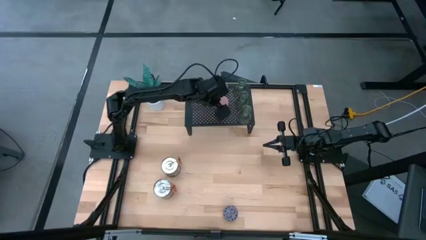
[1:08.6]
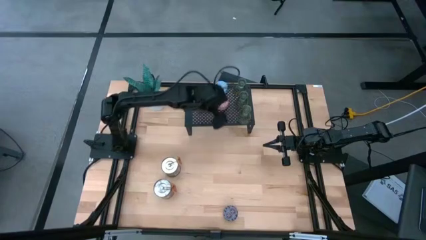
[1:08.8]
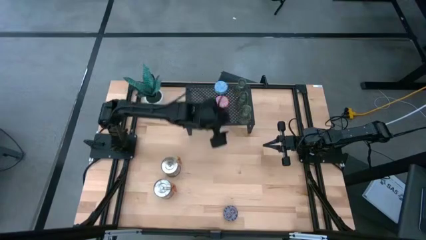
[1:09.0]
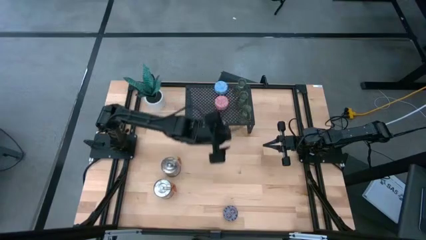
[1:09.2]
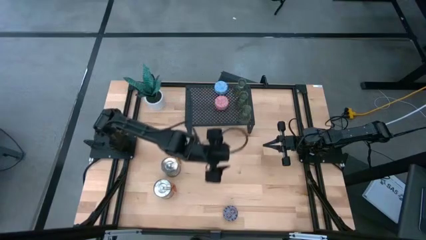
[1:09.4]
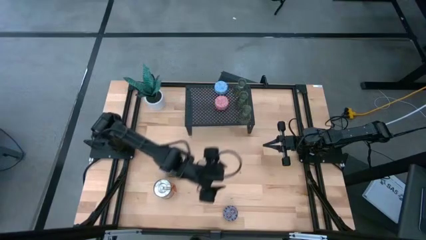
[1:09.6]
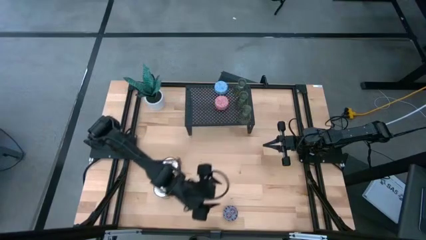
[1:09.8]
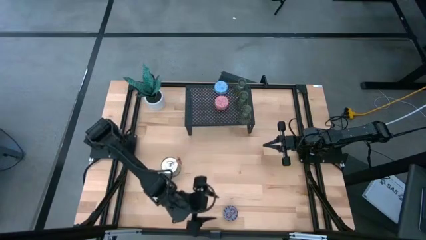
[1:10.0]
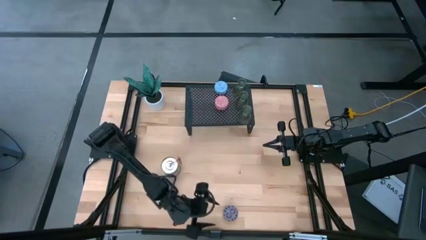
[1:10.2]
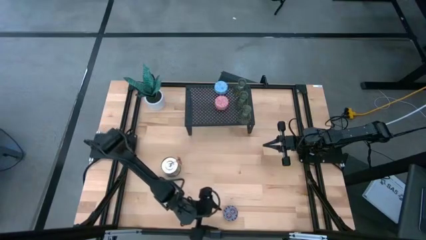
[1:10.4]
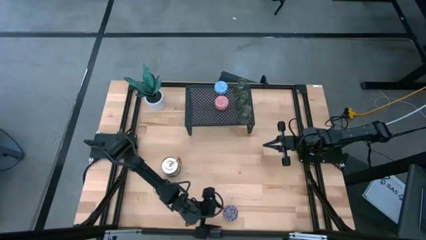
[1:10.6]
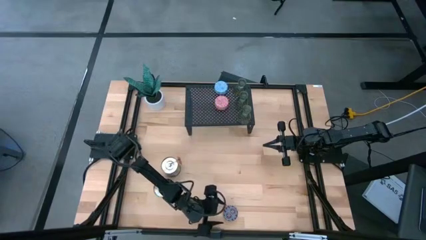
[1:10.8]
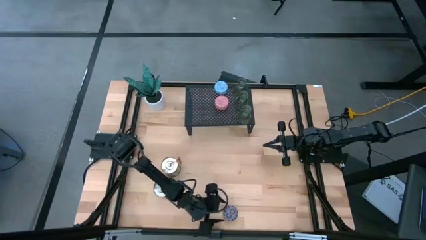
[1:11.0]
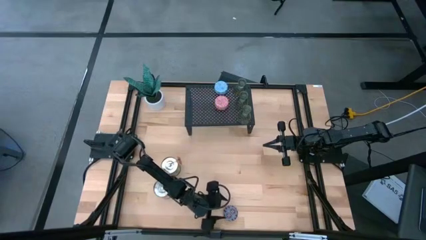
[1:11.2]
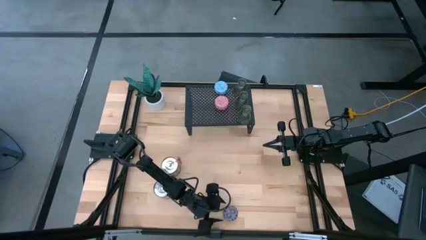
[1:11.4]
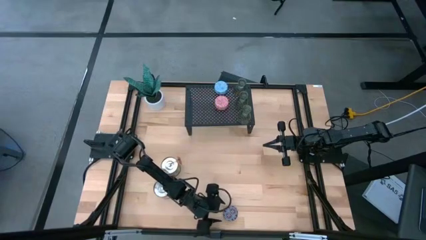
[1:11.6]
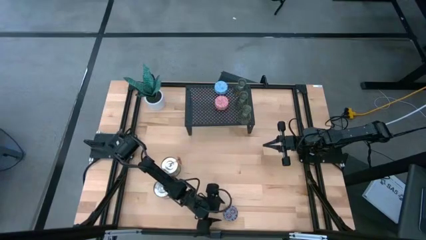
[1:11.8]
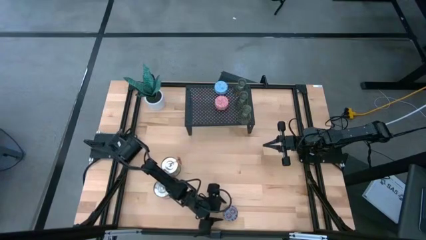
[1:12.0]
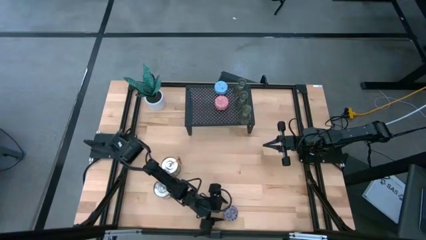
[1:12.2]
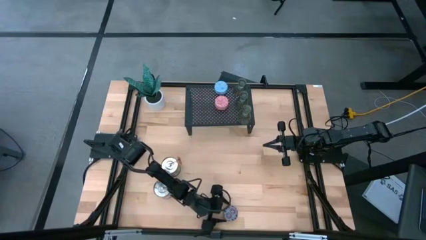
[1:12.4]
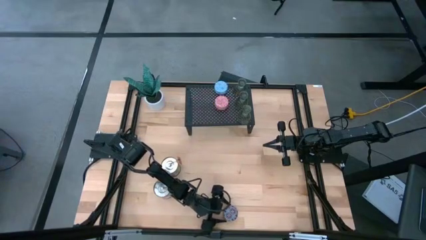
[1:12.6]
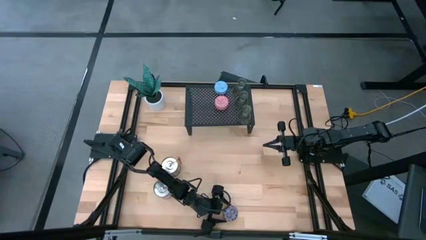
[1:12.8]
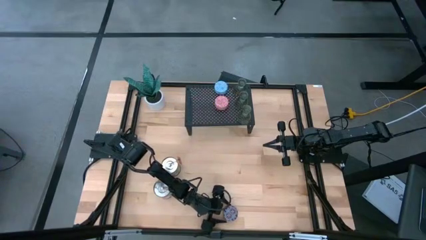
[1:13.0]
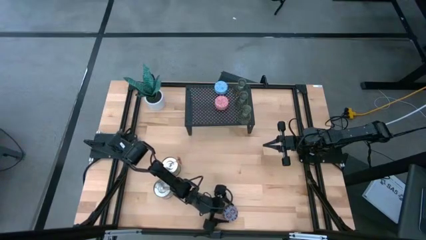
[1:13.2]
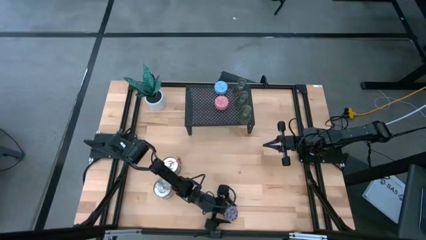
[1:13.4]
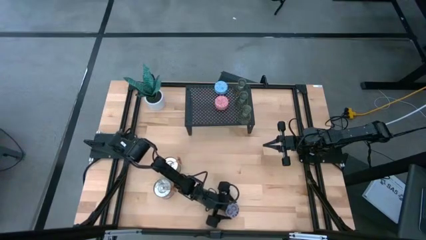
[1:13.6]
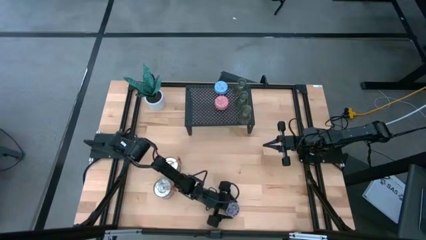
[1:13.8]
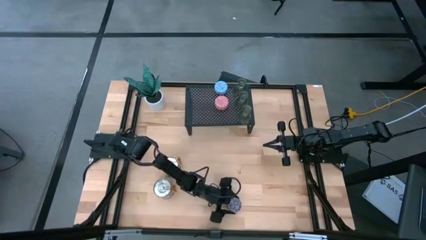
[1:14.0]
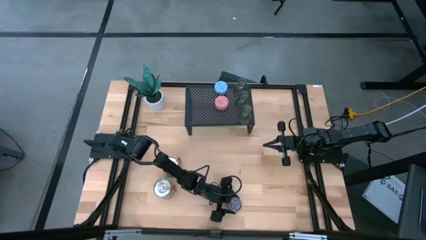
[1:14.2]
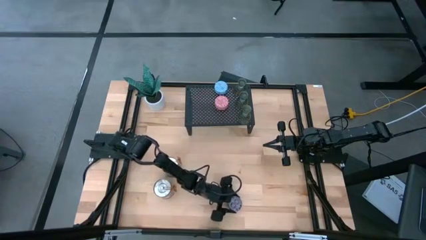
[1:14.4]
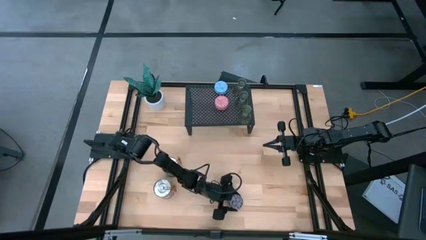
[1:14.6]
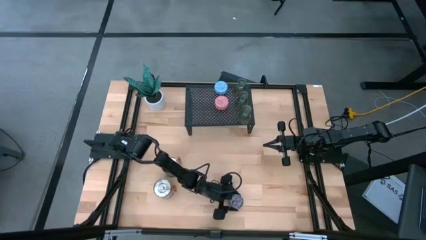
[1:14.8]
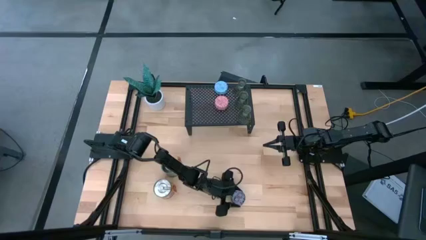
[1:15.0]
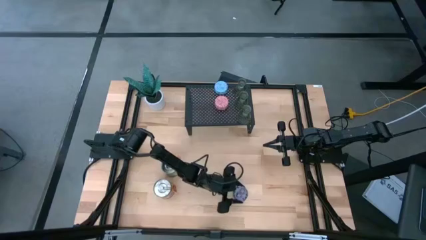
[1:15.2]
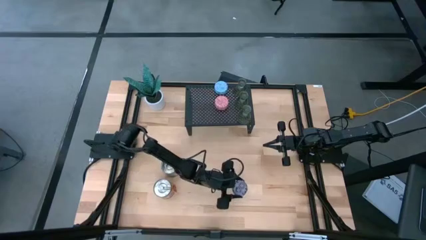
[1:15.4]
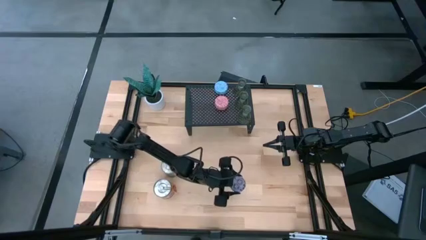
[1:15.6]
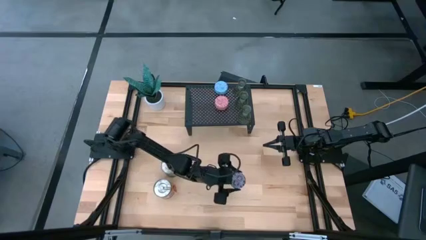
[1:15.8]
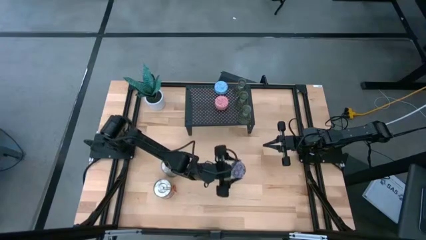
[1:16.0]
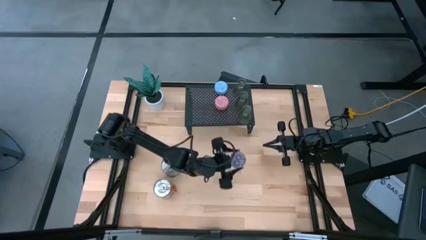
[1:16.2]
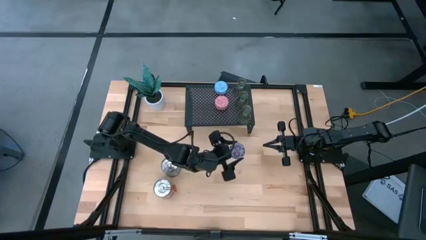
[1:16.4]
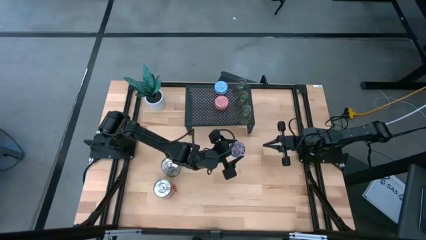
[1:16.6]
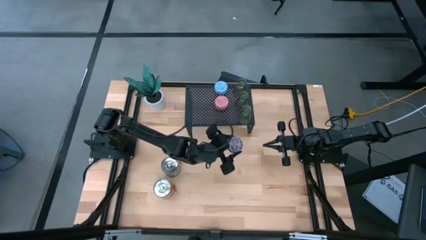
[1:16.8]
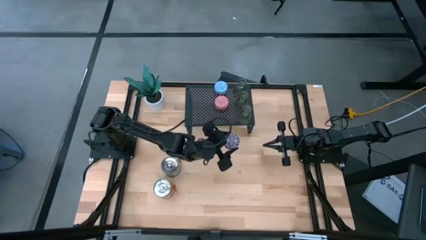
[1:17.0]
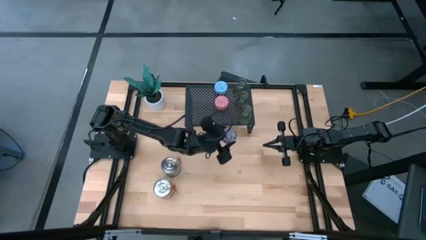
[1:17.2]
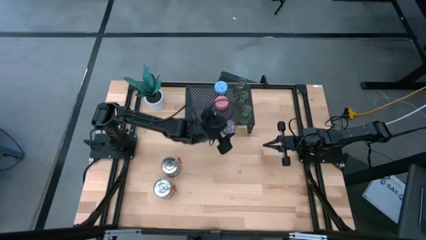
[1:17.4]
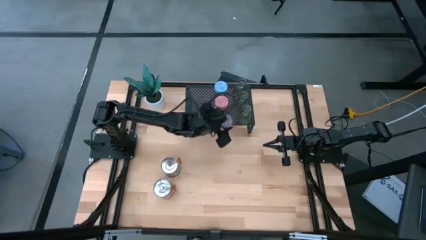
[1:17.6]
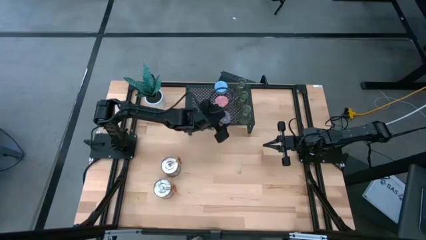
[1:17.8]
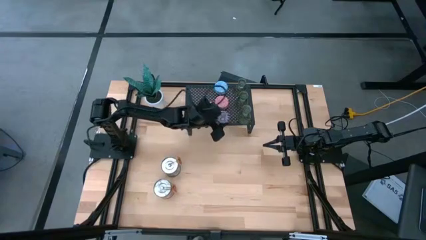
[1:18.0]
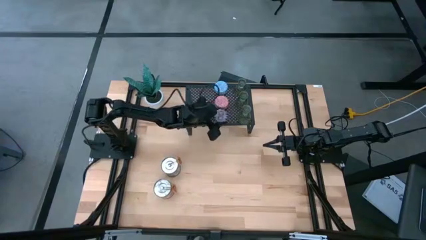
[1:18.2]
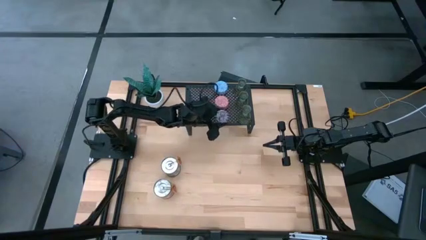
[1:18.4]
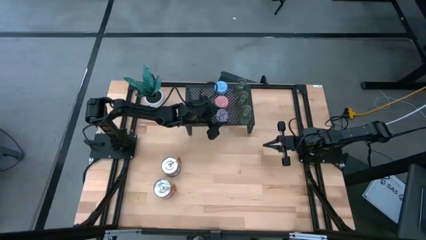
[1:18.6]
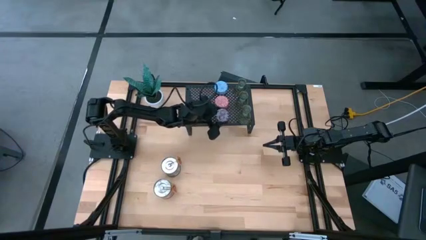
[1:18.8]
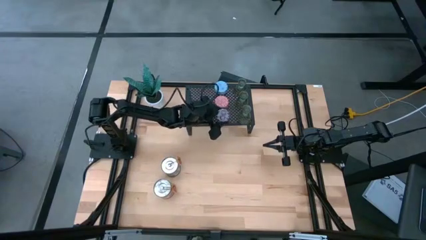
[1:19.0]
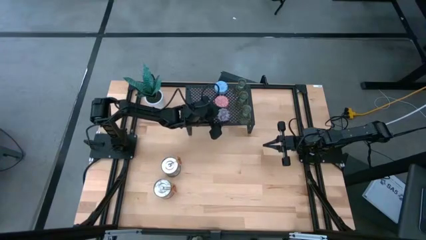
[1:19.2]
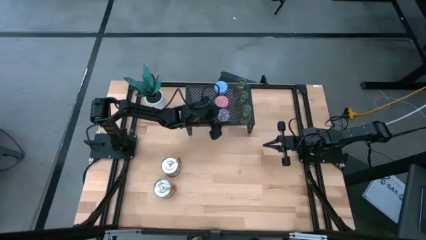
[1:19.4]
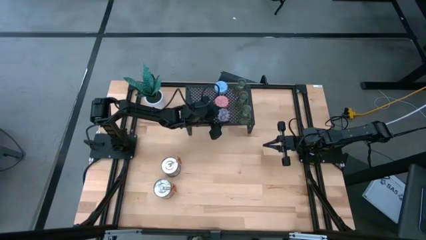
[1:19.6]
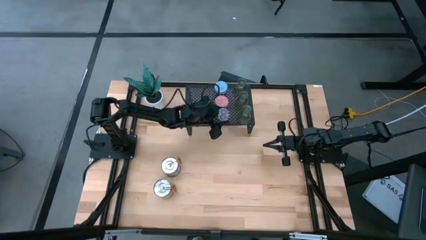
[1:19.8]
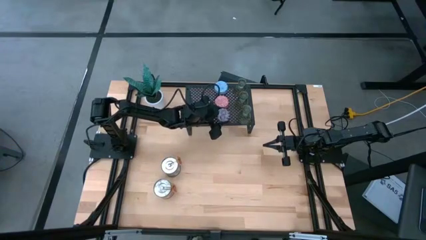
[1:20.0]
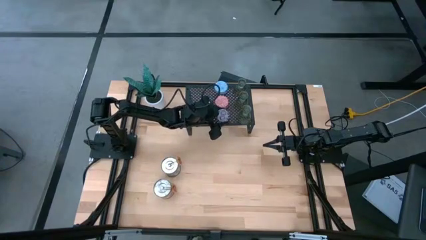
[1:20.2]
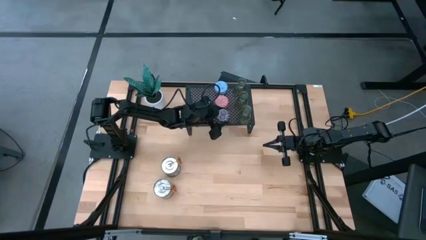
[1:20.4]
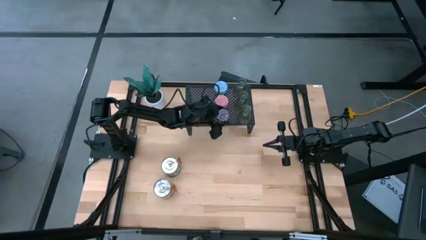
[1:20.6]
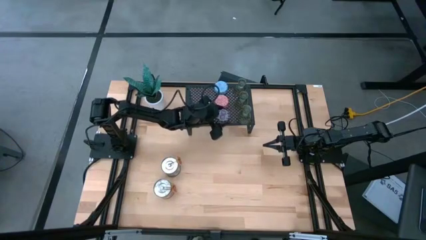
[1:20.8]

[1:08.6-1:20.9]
Task: Pick & Place candle stick holders
Put the red scented candle on the shelf
